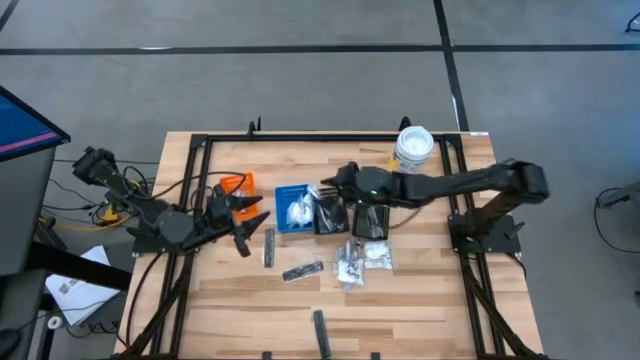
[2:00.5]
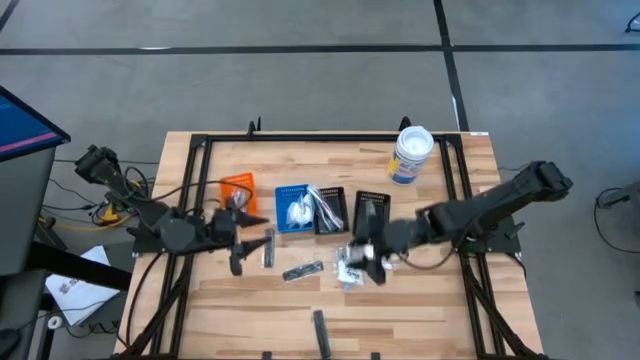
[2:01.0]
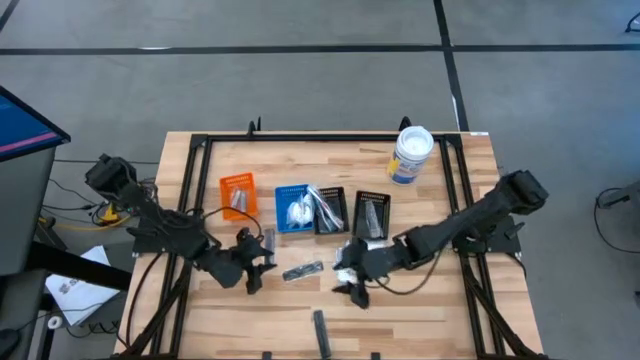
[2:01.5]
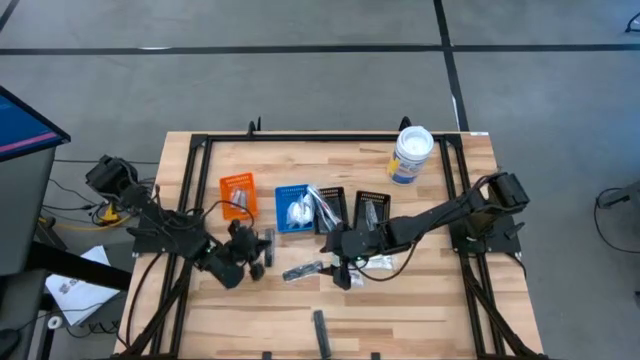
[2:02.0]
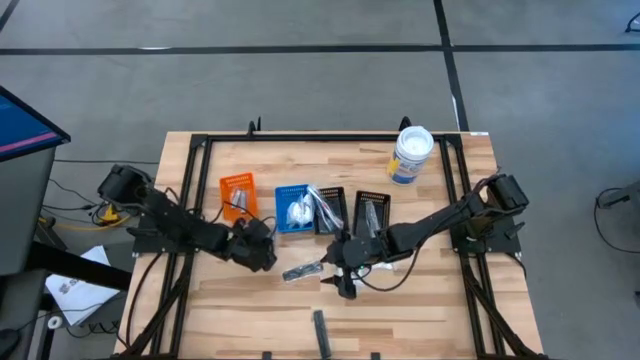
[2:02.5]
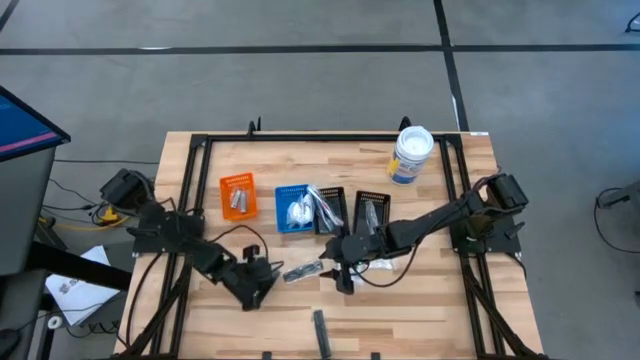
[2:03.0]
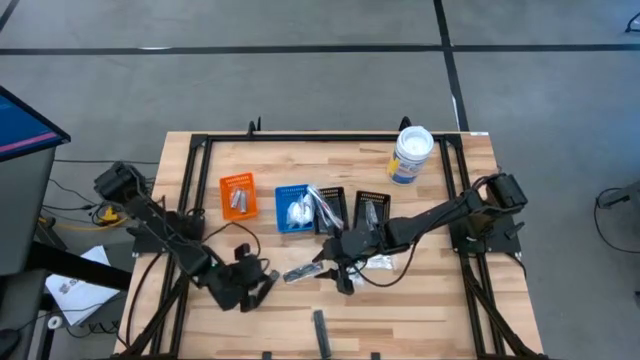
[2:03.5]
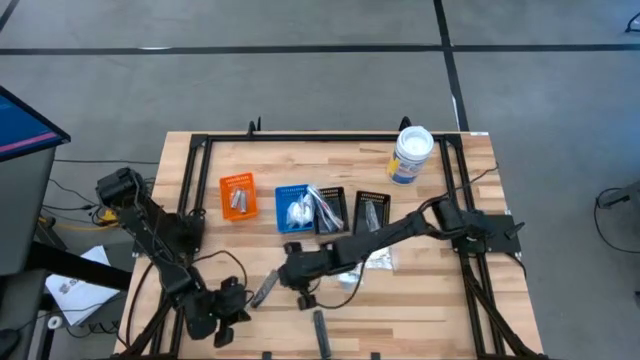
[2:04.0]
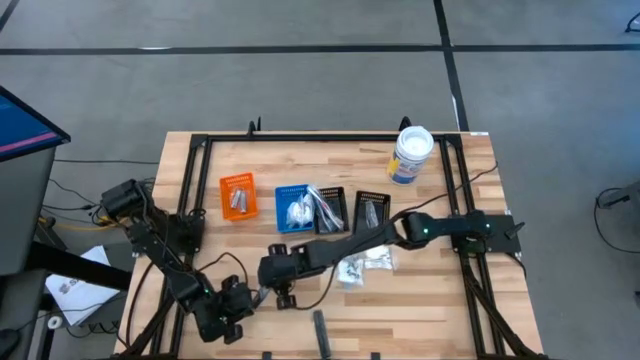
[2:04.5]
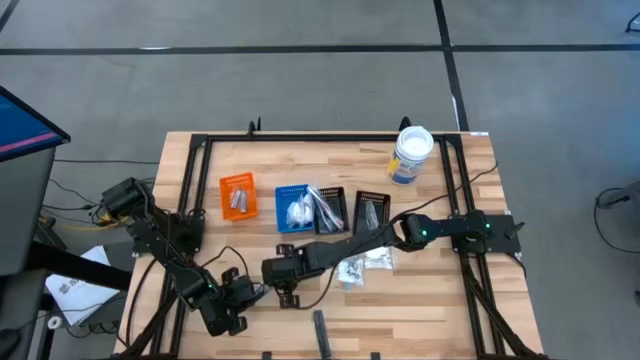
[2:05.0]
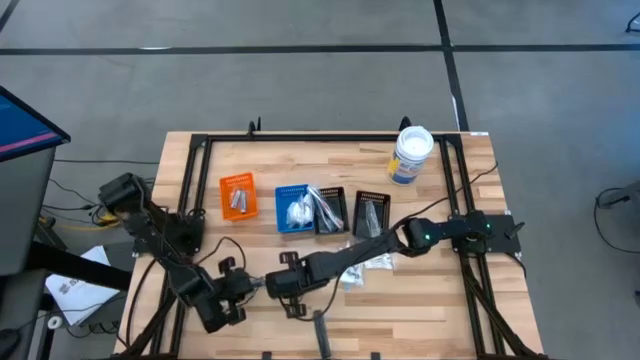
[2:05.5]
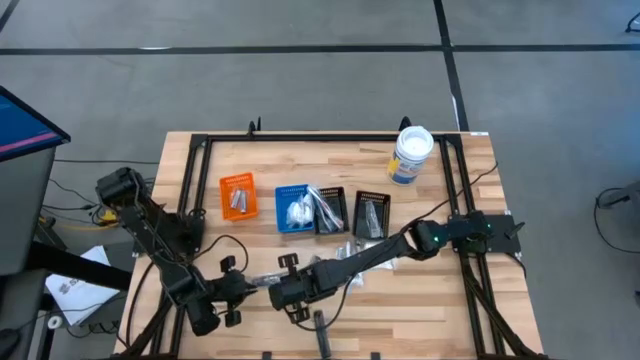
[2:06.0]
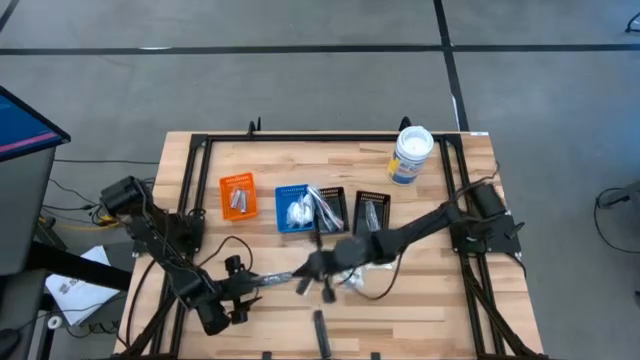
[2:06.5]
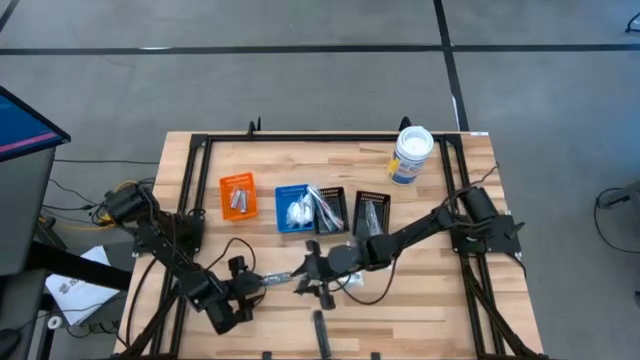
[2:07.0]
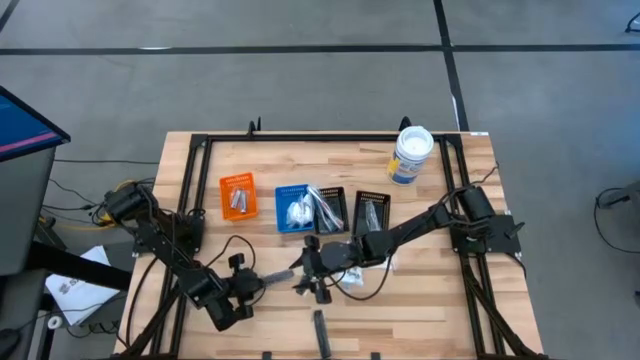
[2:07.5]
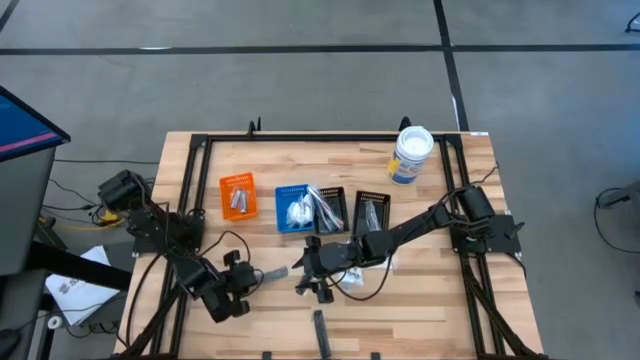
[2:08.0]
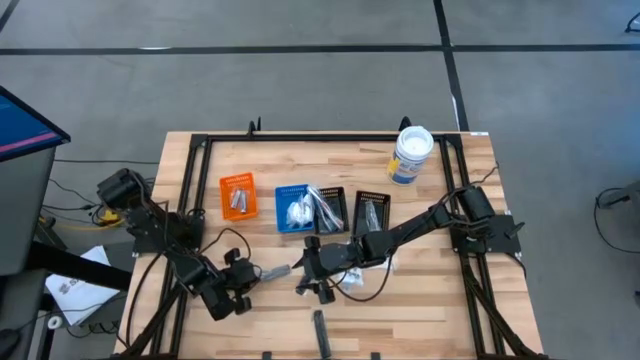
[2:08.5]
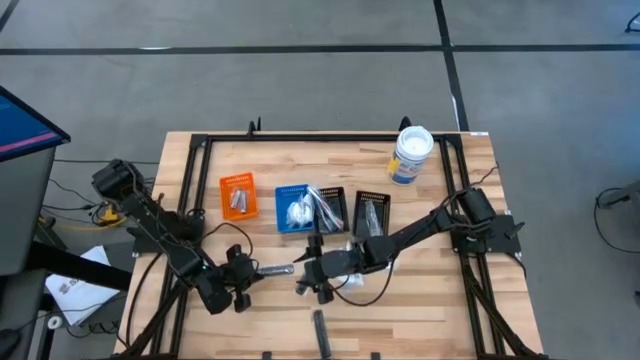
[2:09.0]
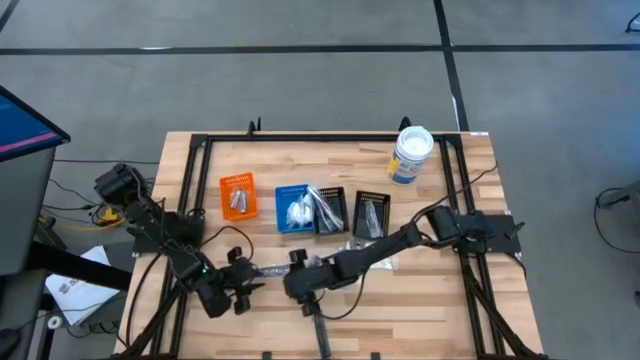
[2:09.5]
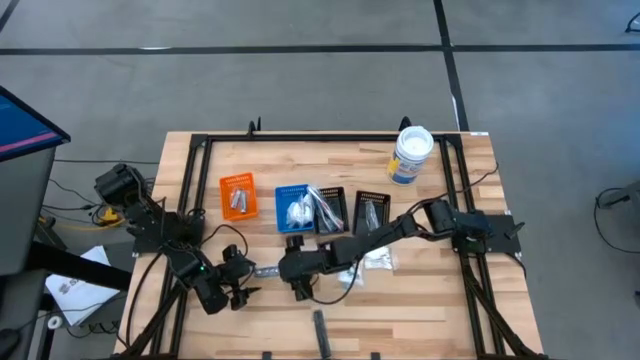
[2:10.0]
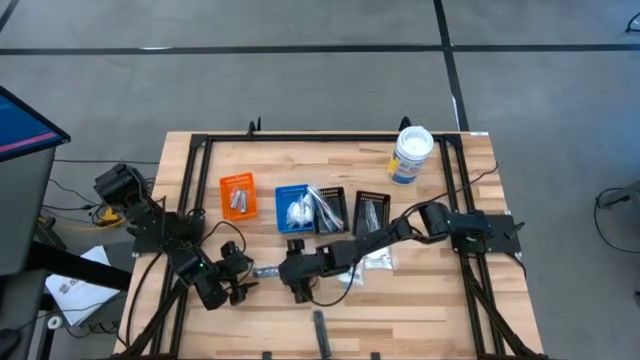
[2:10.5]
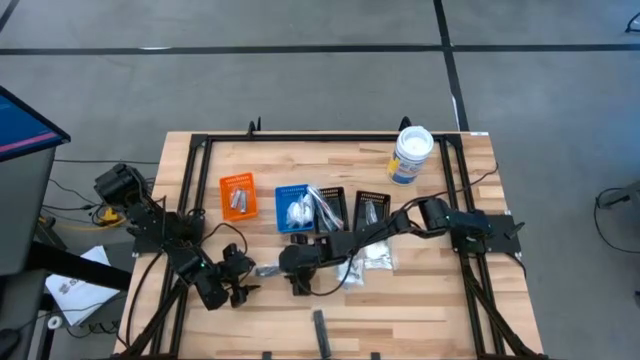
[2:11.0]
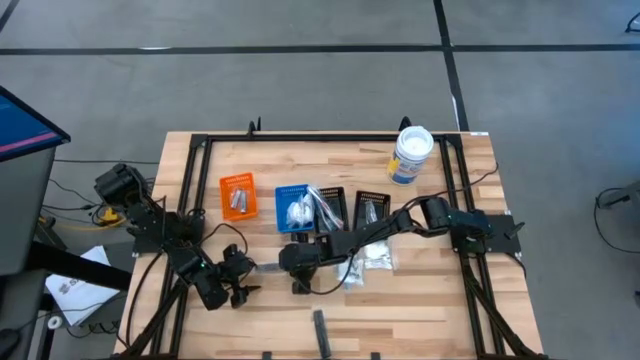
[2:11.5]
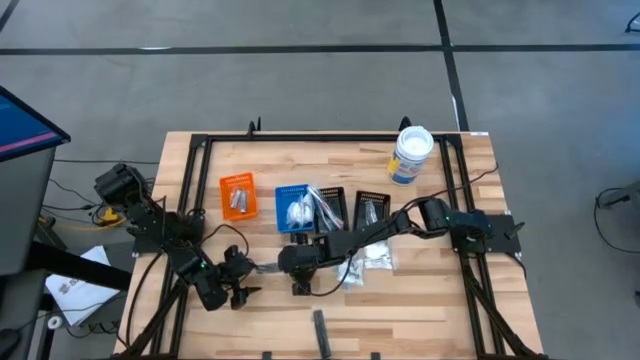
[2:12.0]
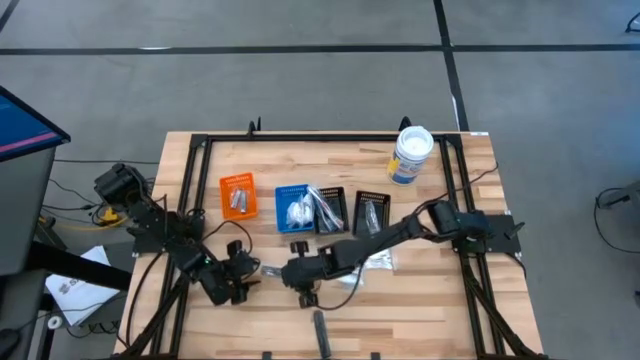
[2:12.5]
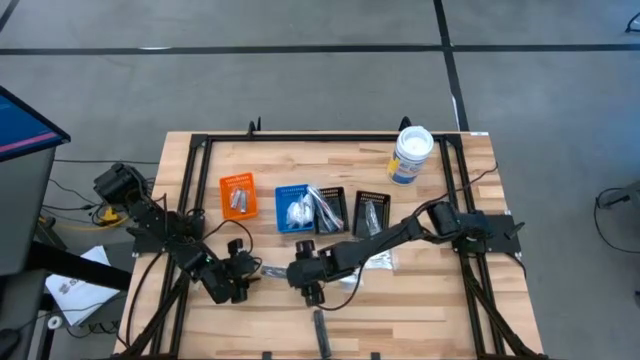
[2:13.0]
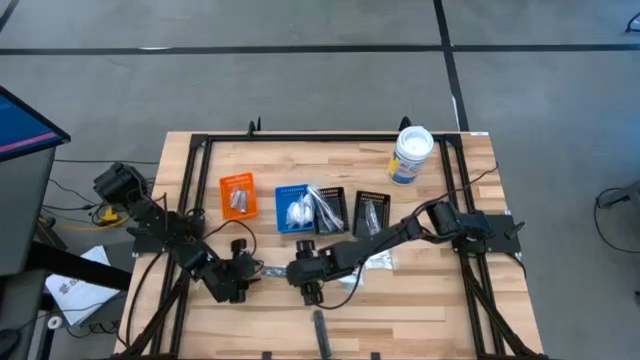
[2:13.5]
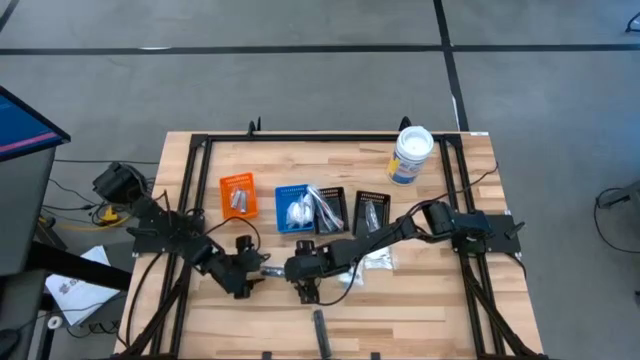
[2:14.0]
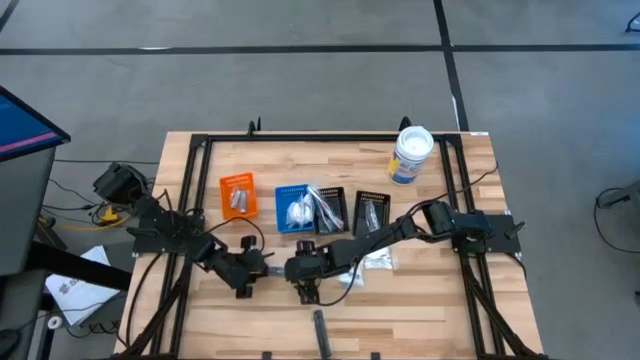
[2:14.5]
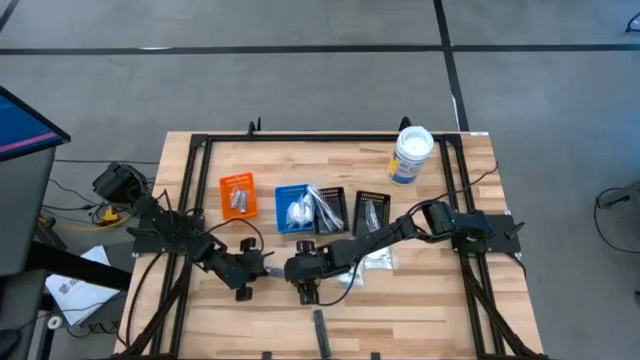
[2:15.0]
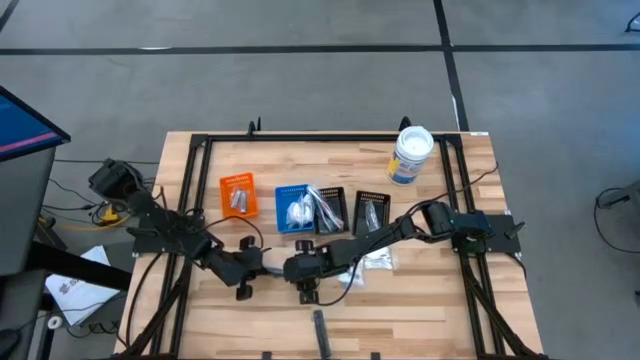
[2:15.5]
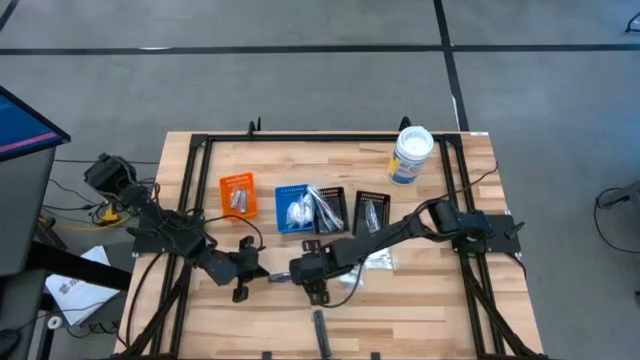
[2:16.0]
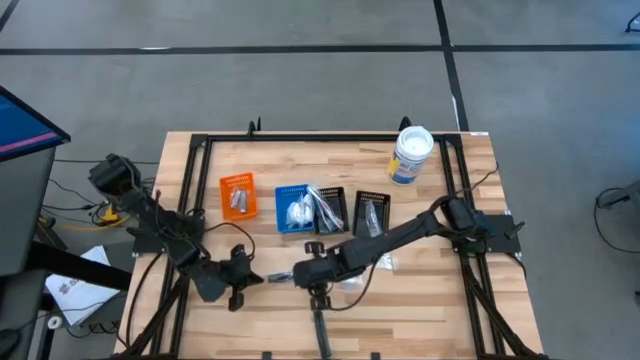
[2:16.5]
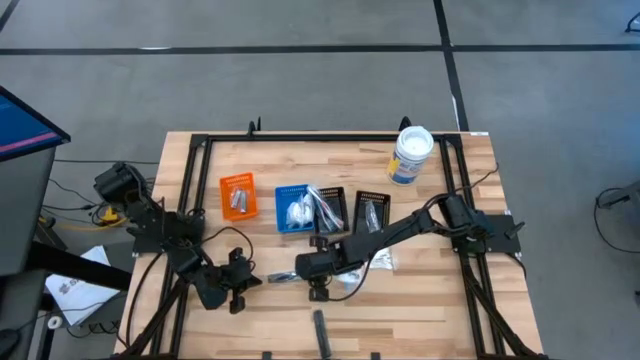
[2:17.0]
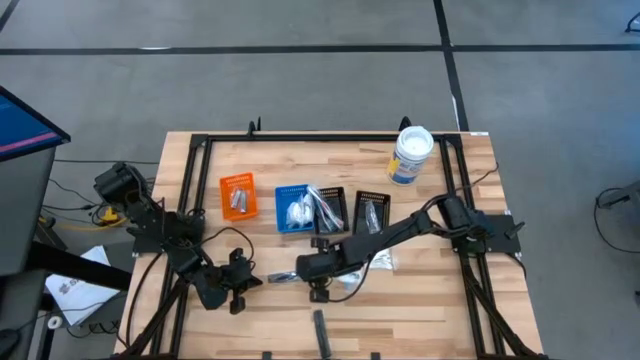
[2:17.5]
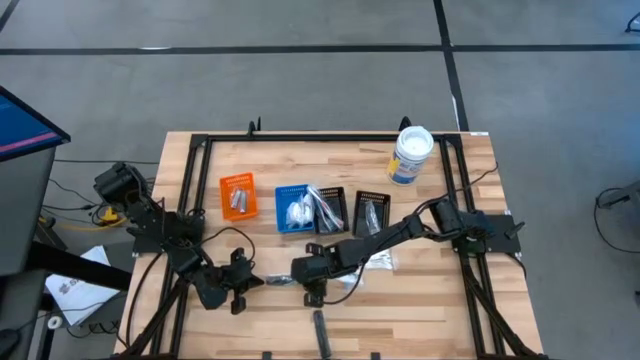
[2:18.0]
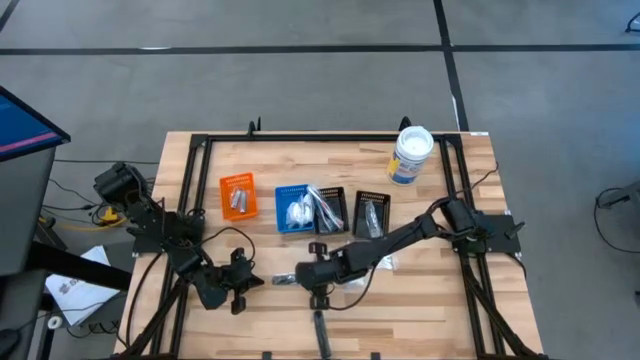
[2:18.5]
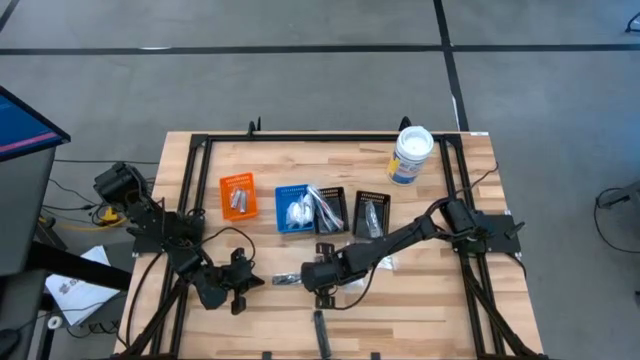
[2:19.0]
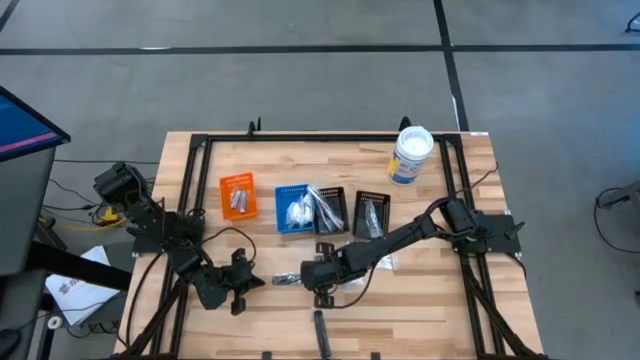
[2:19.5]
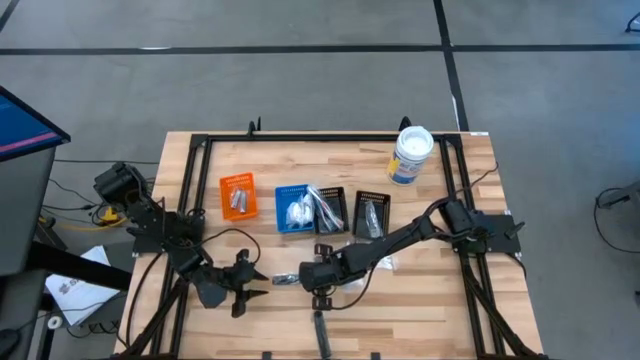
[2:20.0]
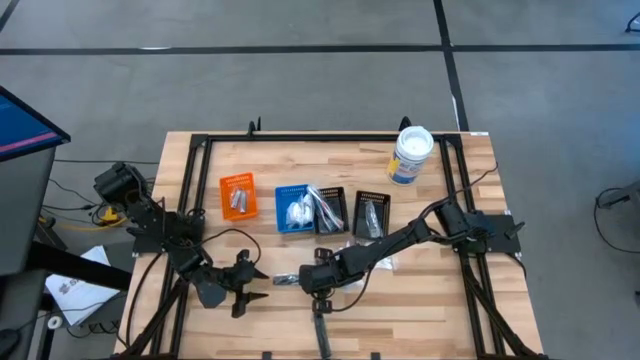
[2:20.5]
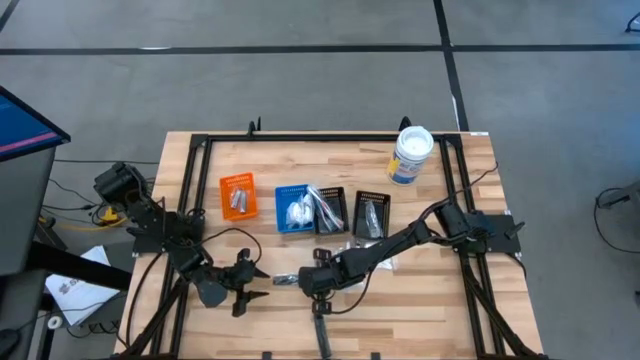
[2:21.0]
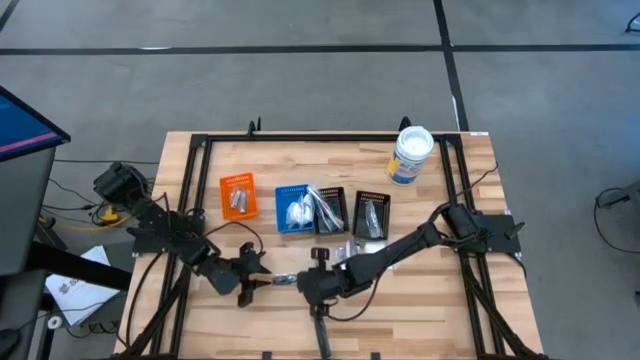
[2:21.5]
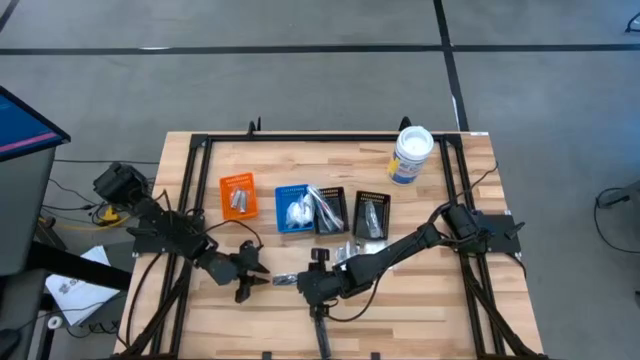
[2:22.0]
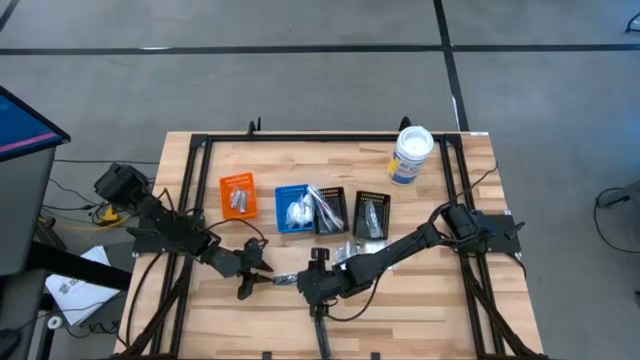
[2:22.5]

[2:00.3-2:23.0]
Task: Pick & Place Travel size toiletries
Put the black comb into the right black bin
